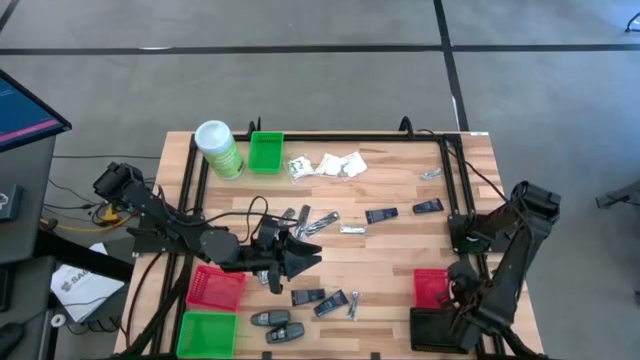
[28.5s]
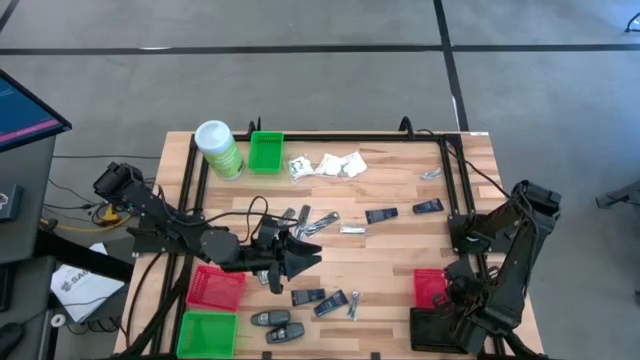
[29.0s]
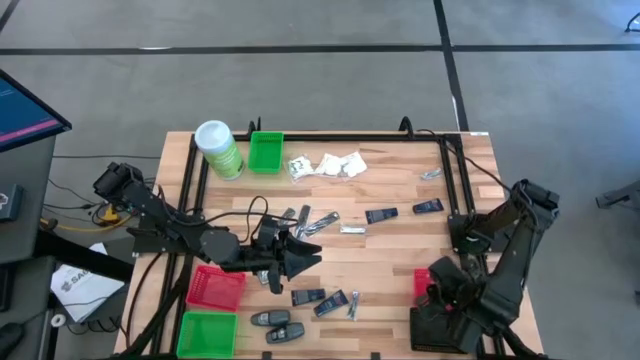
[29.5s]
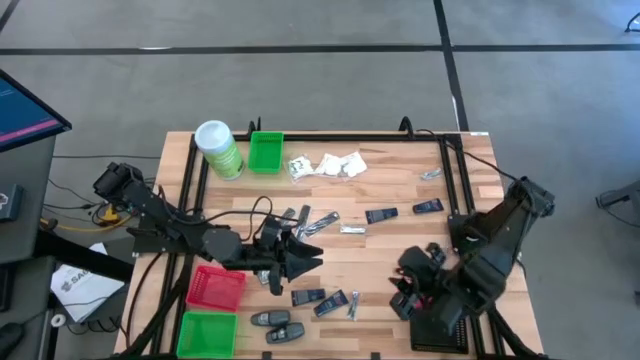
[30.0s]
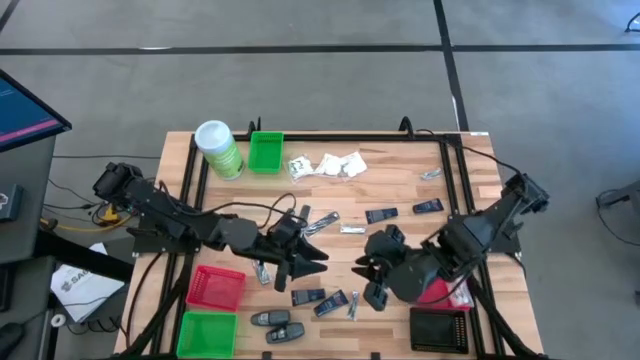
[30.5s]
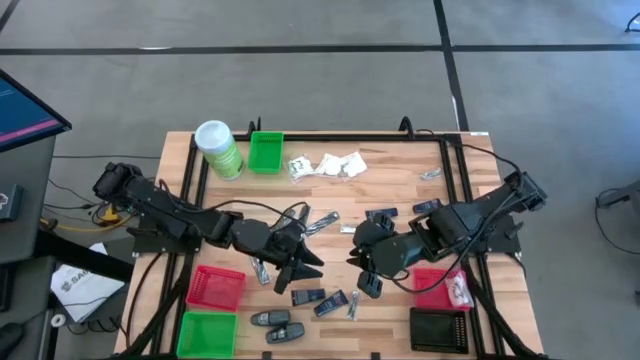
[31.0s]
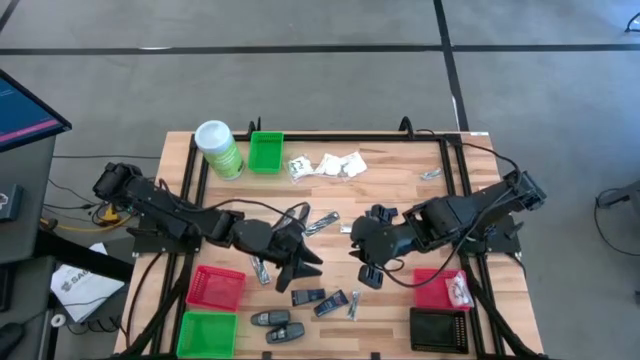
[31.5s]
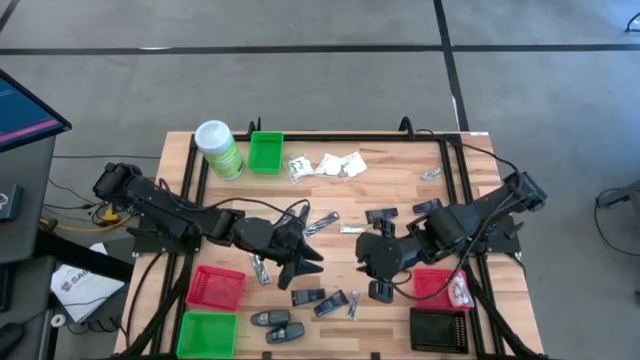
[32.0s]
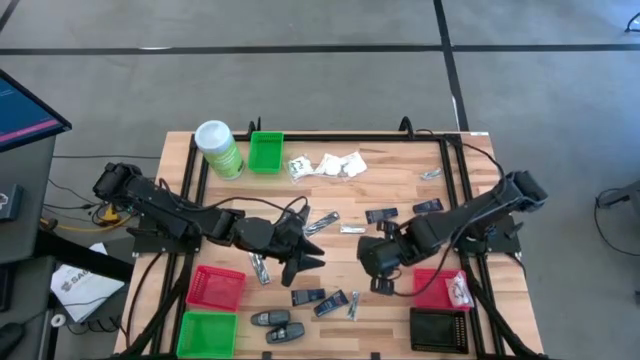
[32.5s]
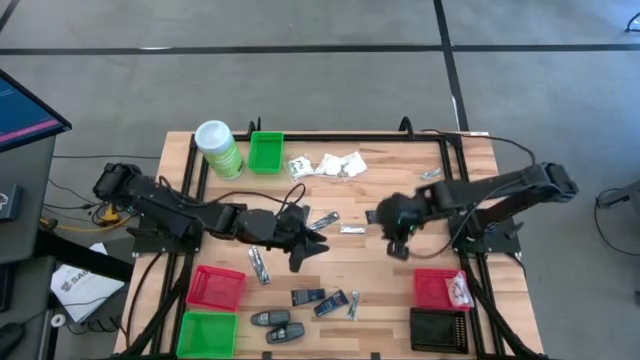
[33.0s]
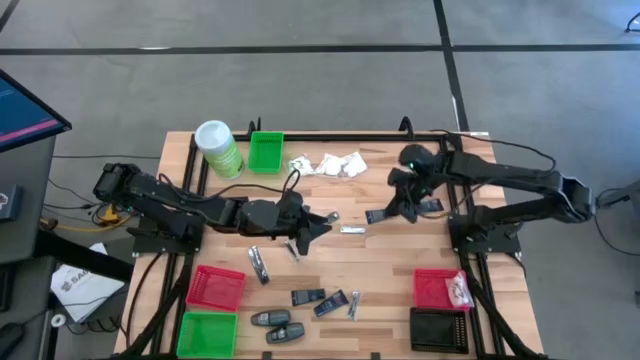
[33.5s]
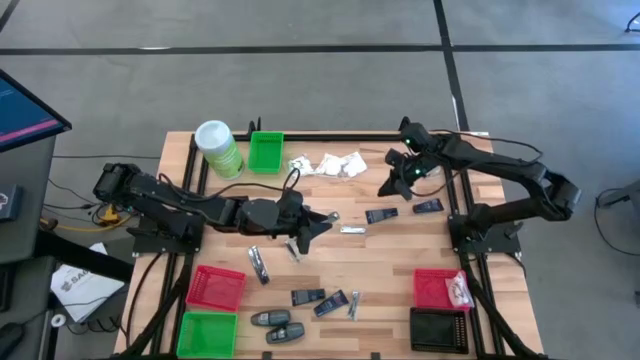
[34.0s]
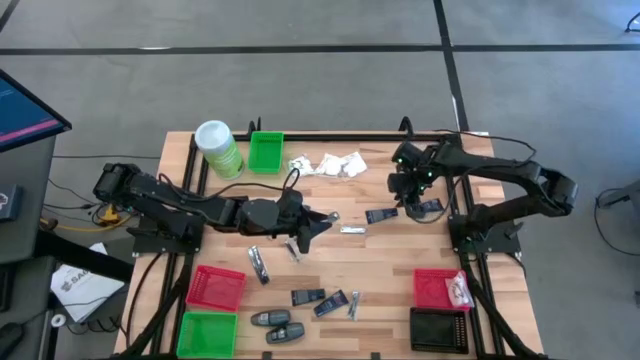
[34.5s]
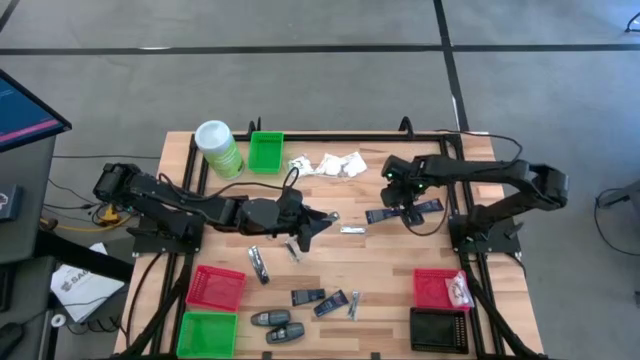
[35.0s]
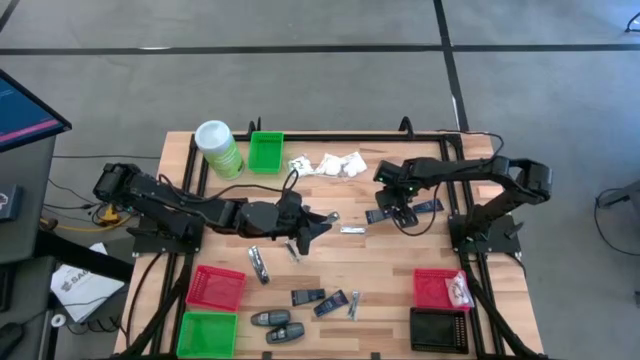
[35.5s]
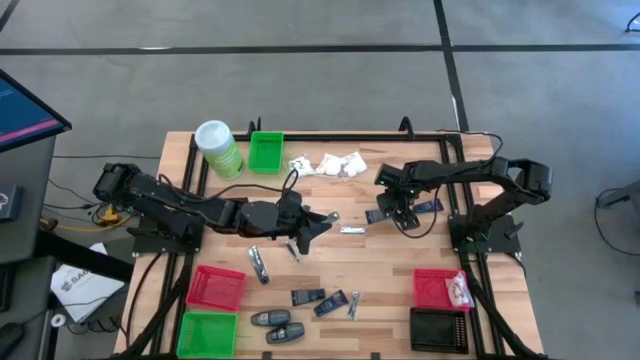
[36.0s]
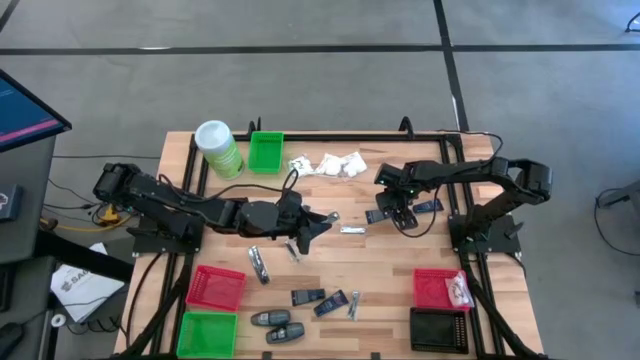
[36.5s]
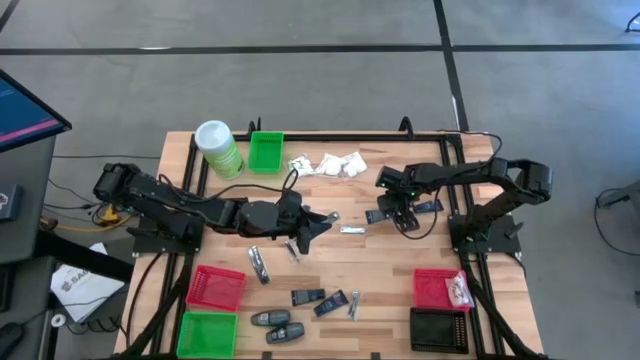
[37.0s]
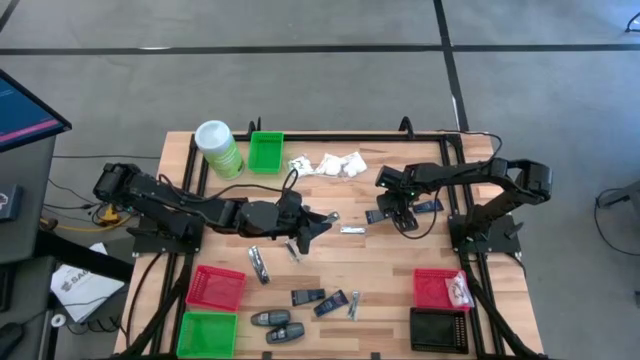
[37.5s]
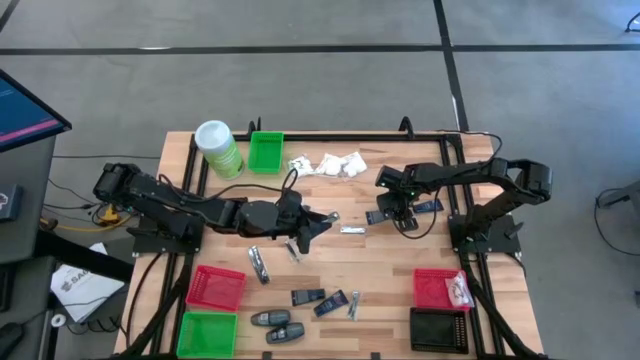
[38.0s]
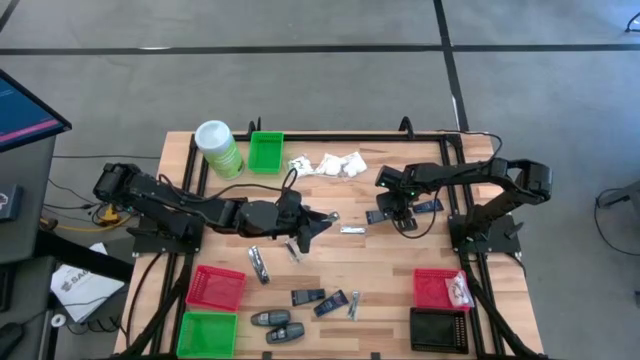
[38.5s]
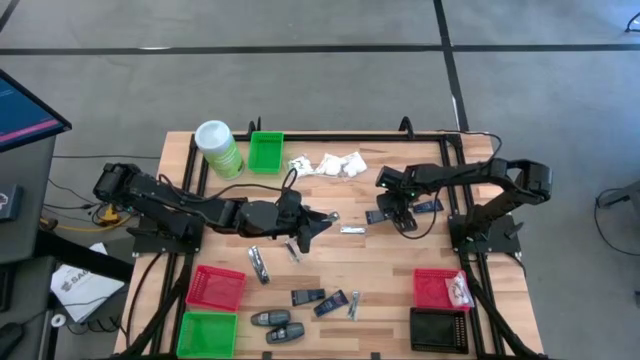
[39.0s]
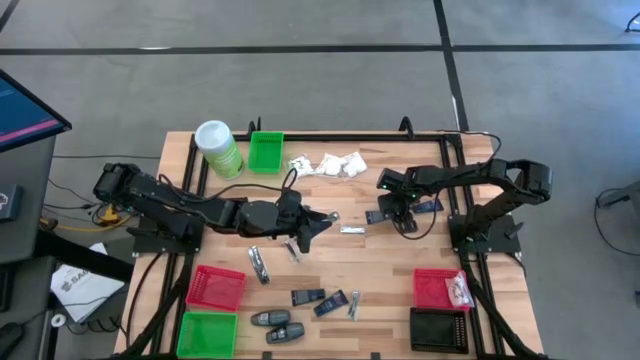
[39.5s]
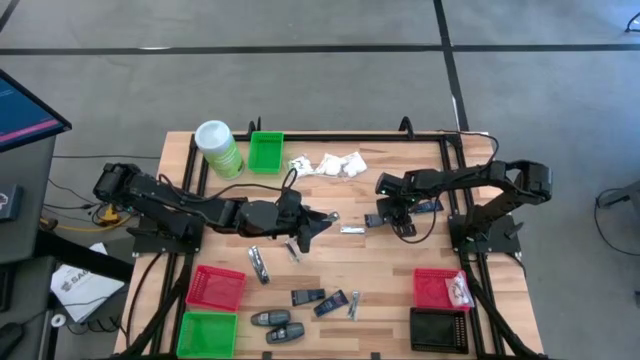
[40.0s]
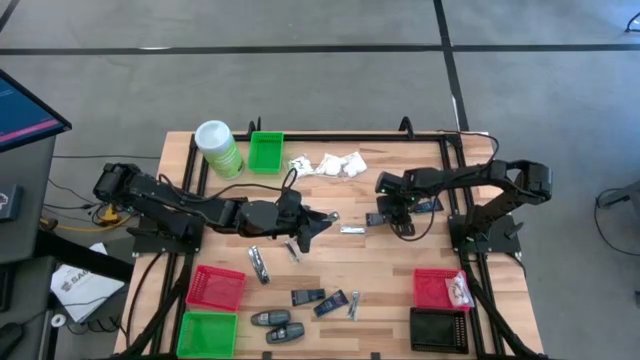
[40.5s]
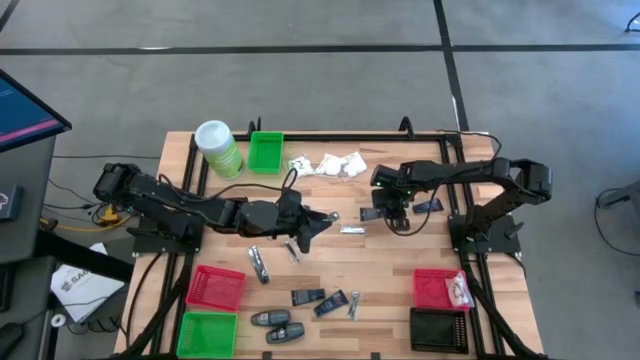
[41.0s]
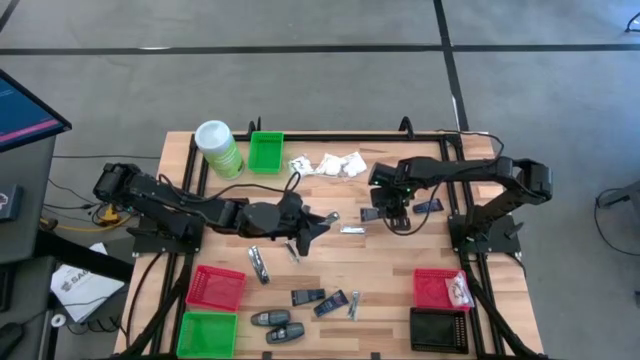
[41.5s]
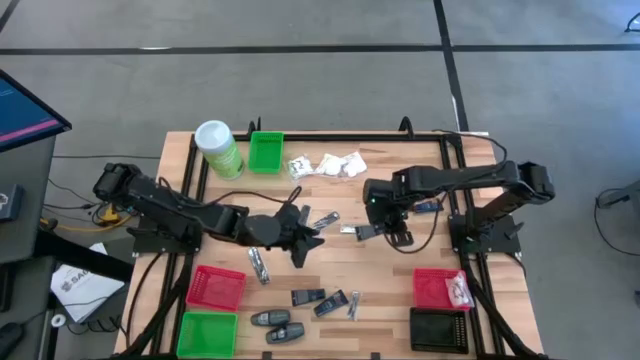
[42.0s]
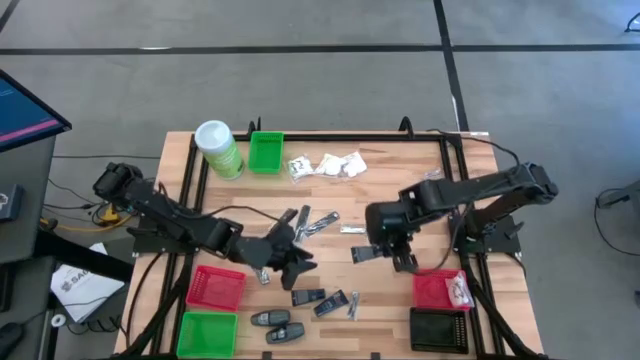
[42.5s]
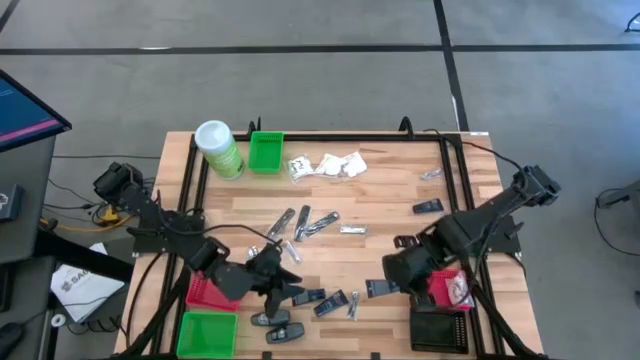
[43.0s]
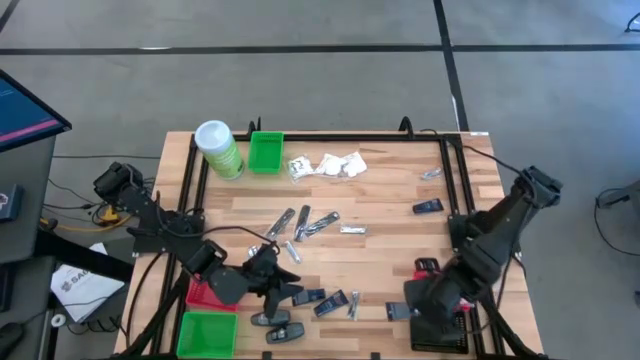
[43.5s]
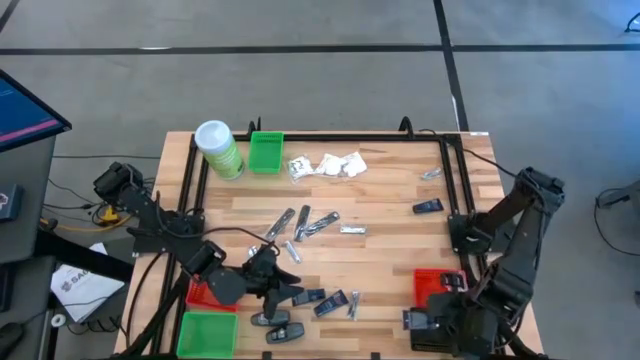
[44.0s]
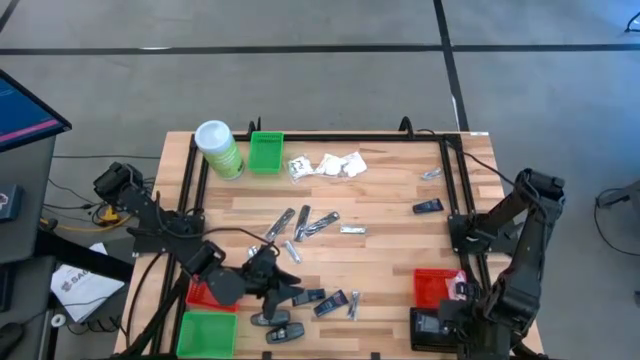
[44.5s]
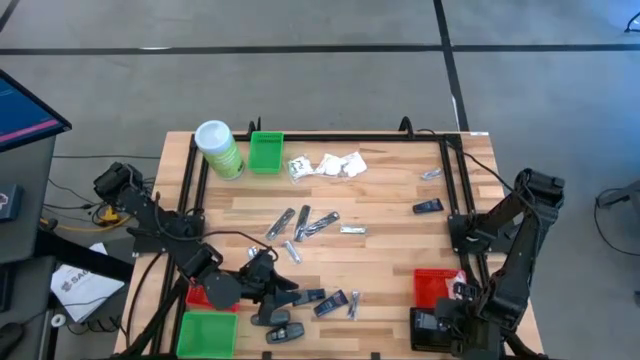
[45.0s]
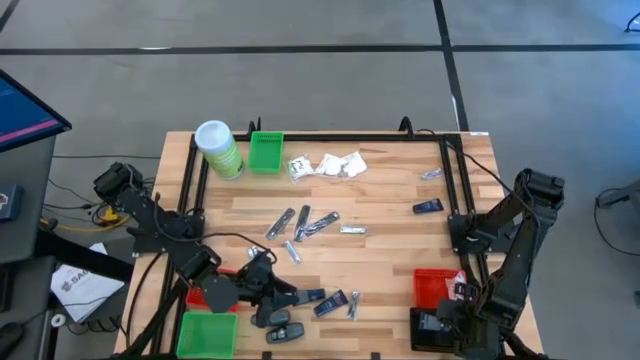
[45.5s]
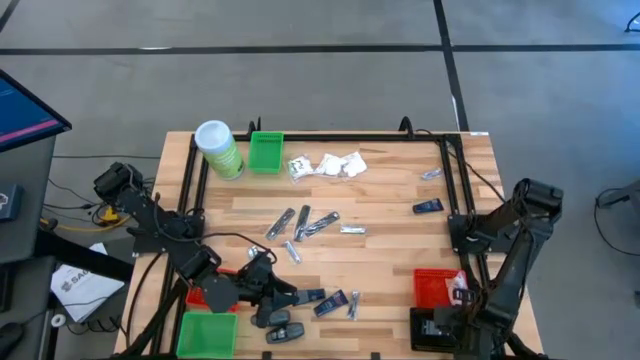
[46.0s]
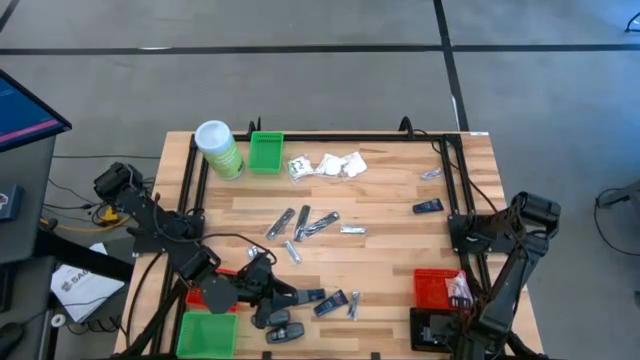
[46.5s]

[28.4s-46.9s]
Task: Pick & Place Travel size toiletries
Put the shave cream into the black bin

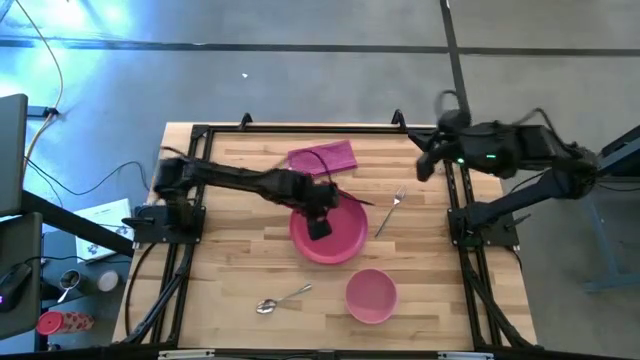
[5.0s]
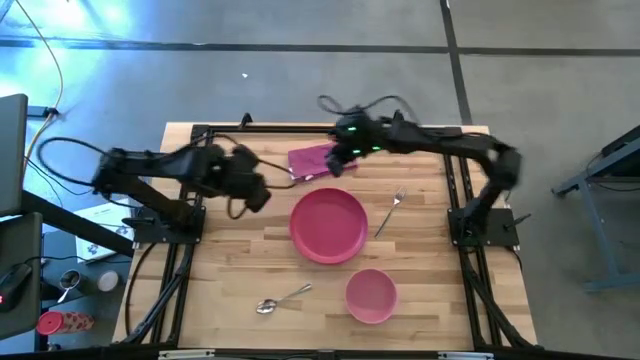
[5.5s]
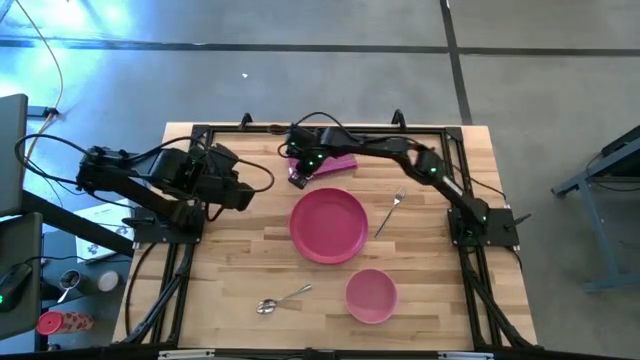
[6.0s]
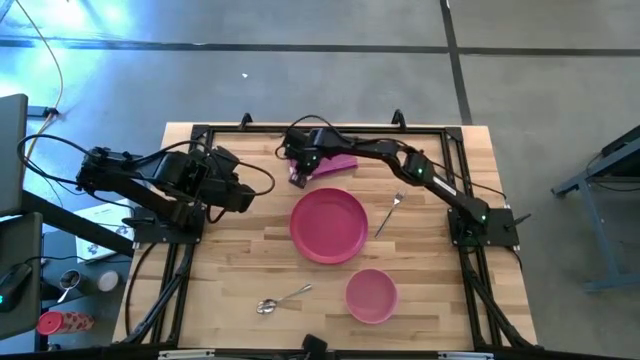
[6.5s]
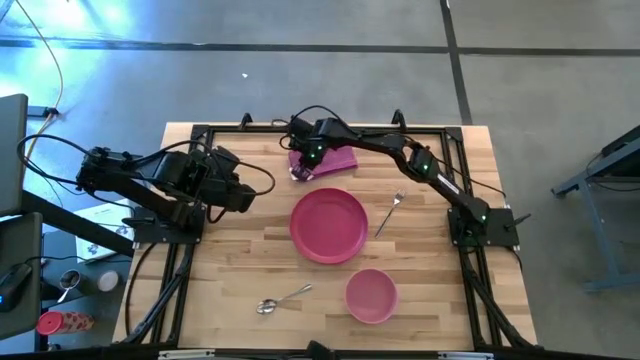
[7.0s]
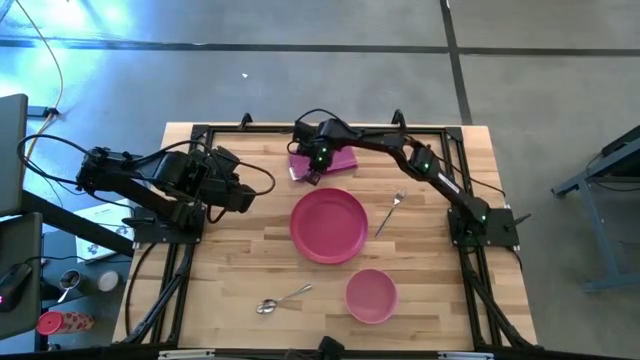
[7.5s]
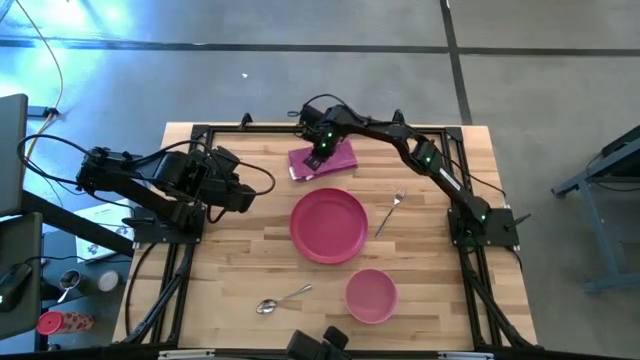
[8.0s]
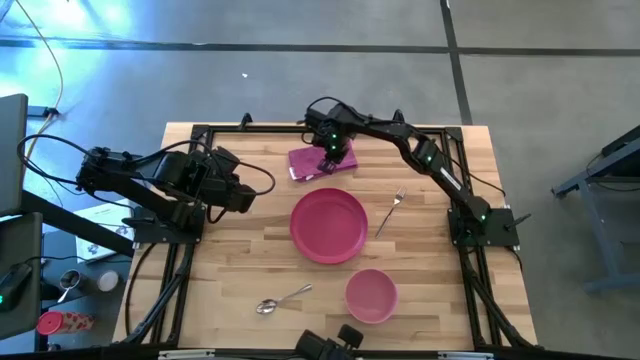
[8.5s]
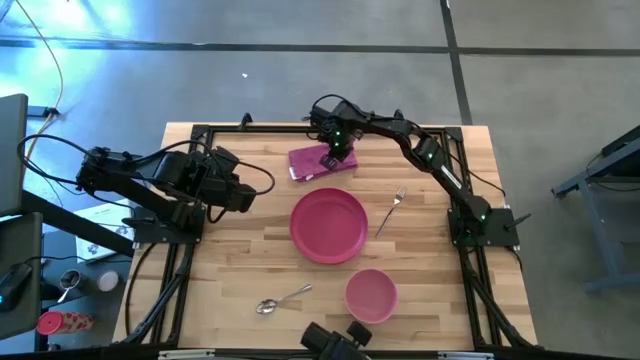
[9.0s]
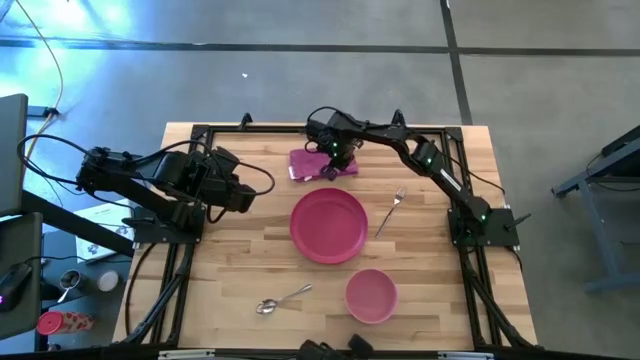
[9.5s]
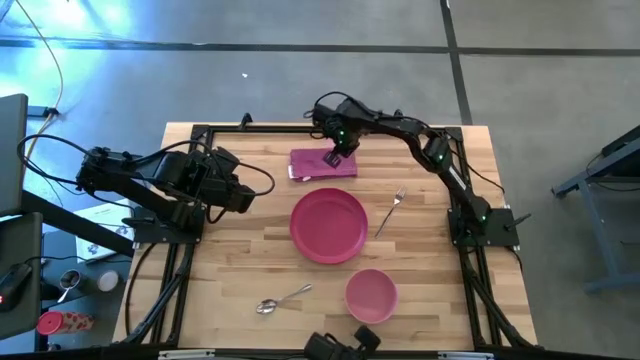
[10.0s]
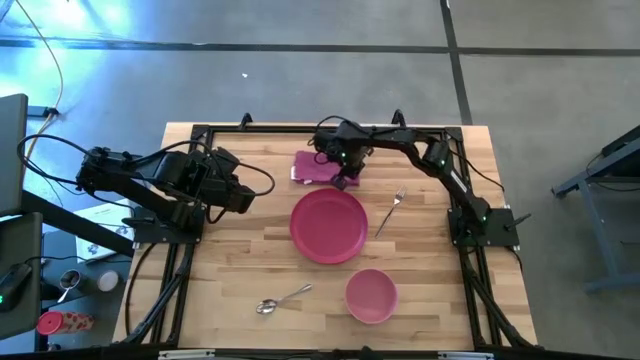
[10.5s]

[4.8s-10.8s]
Task: Set table place
Adjust the pink napkin to the top of the table
